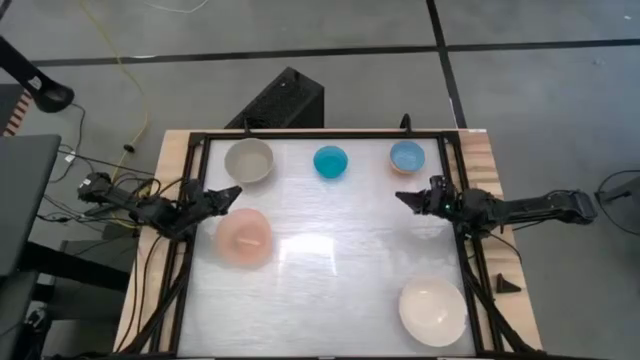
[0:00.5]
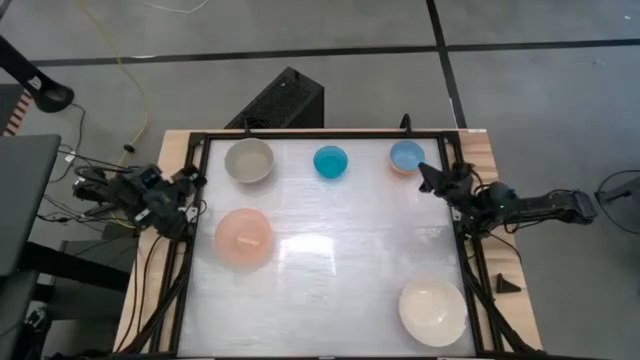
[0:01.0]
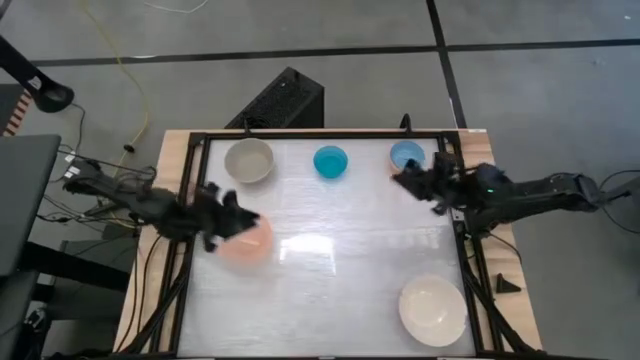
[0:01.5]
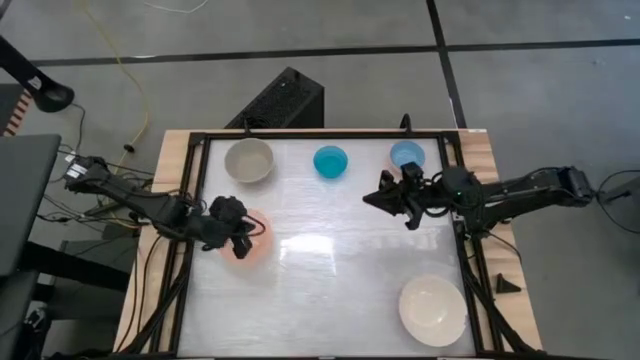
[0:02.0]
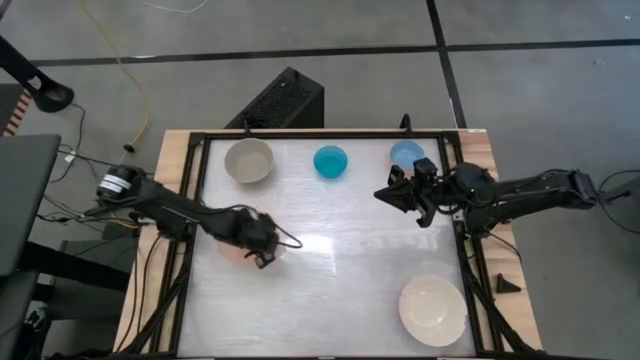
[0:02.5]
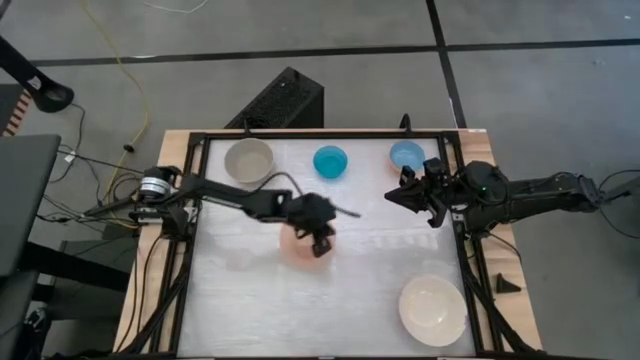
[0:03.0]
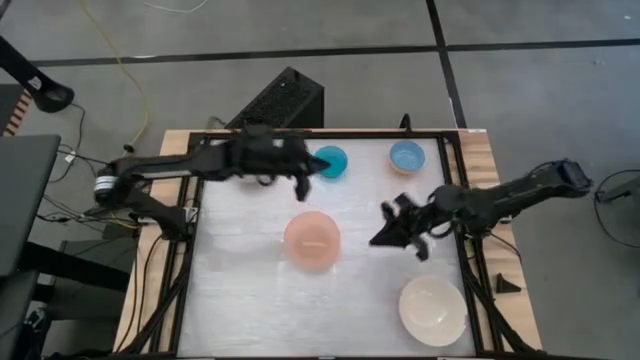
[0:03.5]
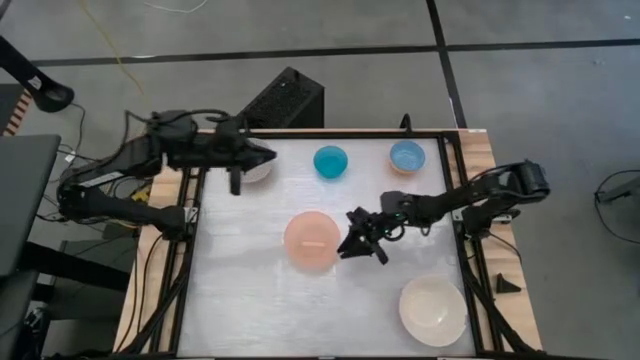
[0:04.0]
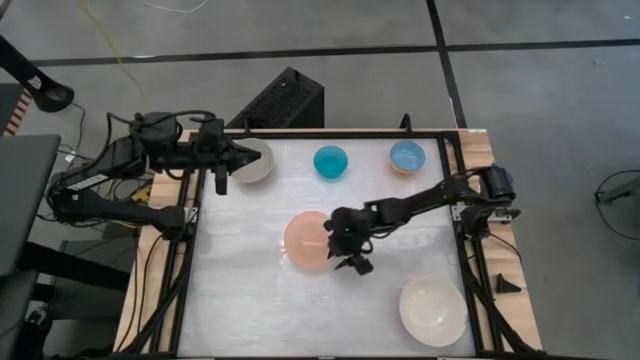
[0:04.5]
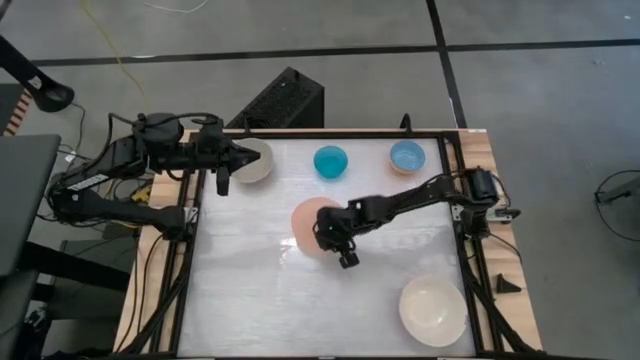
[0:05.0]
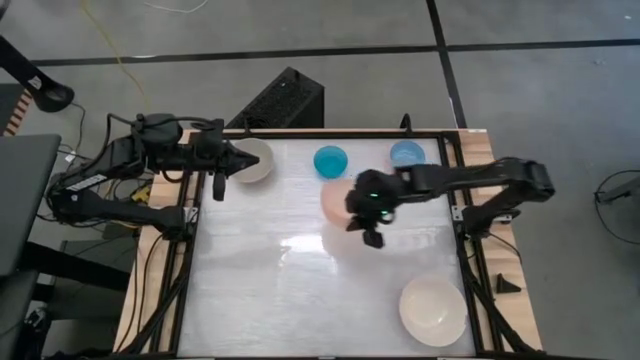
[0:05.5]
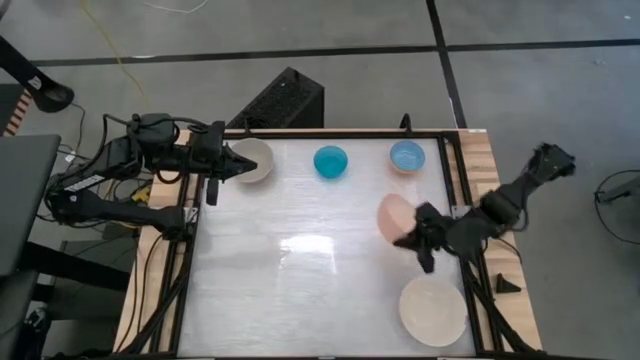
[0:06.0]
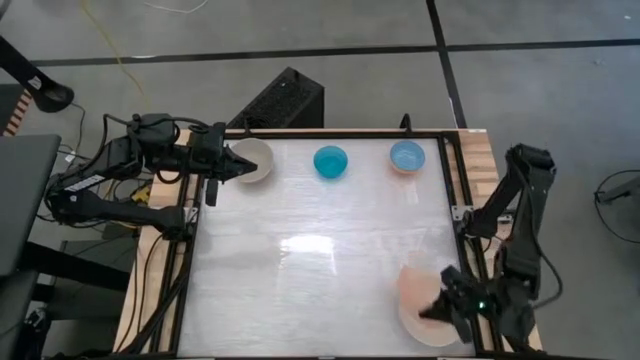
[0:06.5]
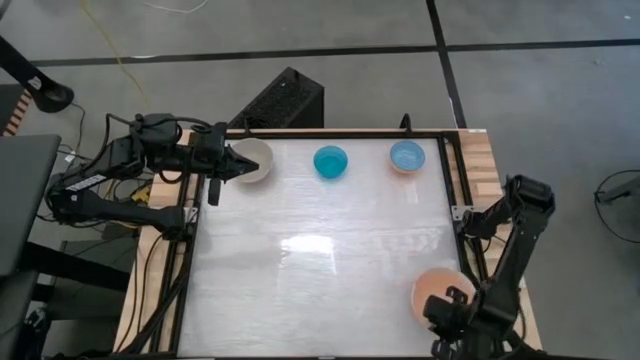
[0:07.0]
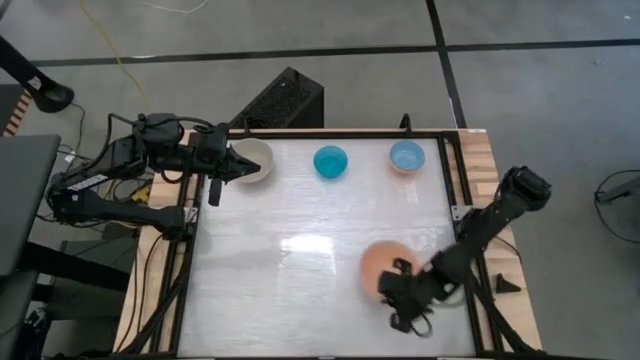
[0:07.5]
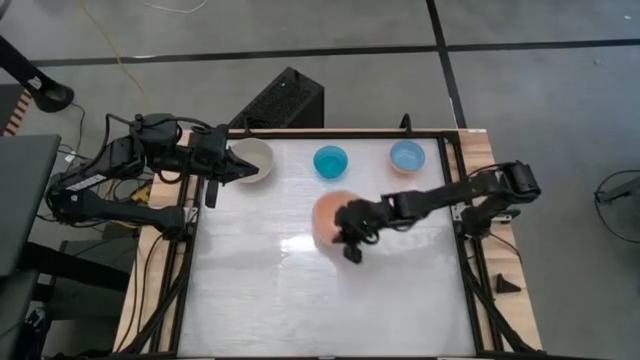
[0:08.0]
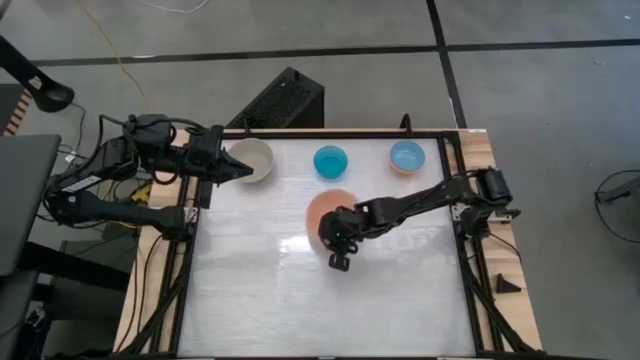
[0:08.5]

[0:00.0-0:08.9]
Stack the orange bowl on top of the white bowl

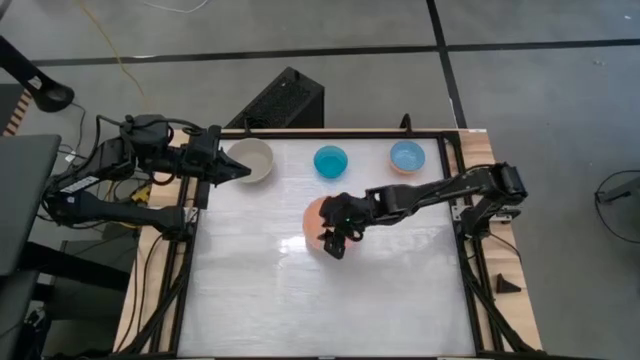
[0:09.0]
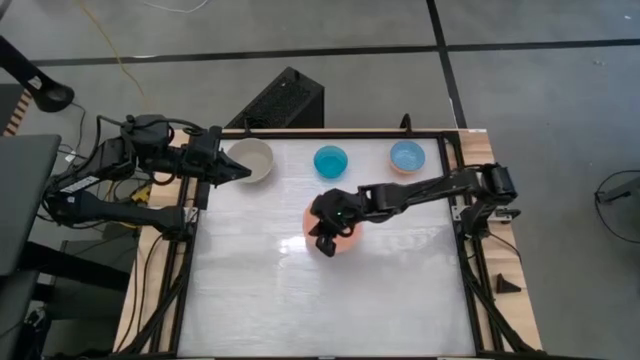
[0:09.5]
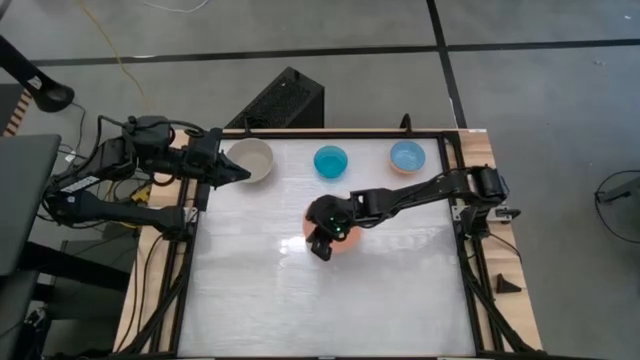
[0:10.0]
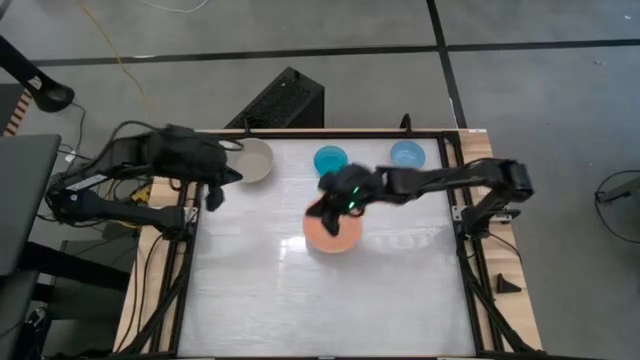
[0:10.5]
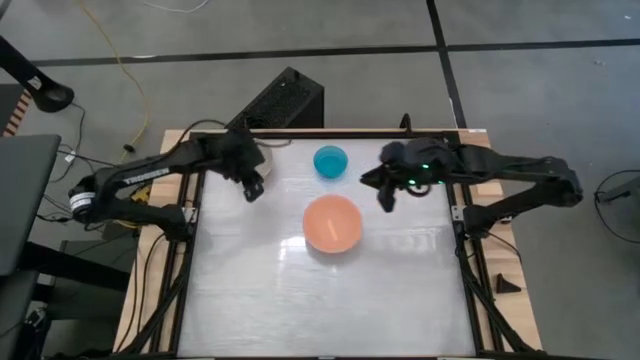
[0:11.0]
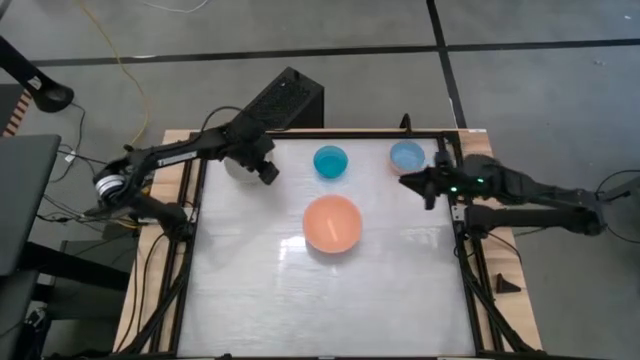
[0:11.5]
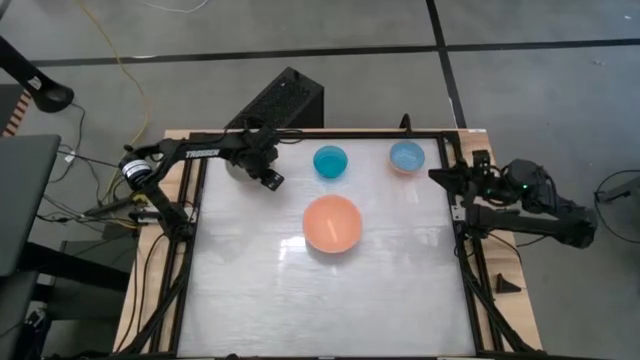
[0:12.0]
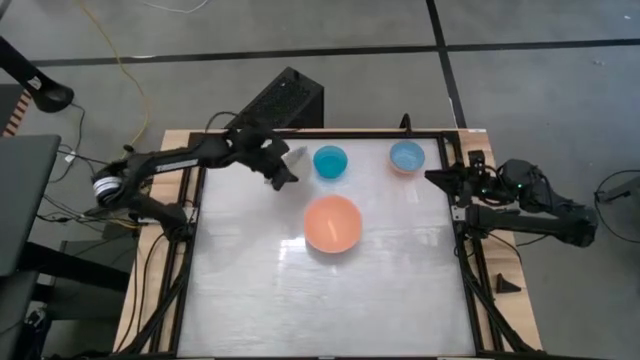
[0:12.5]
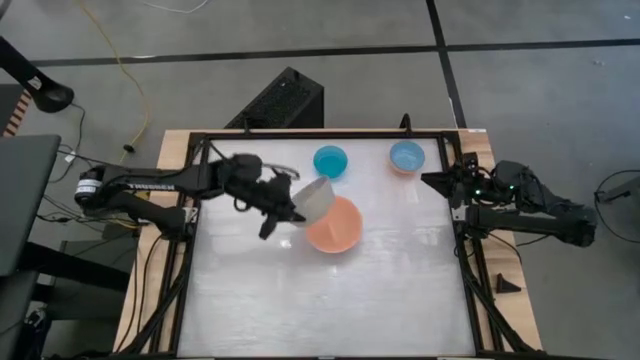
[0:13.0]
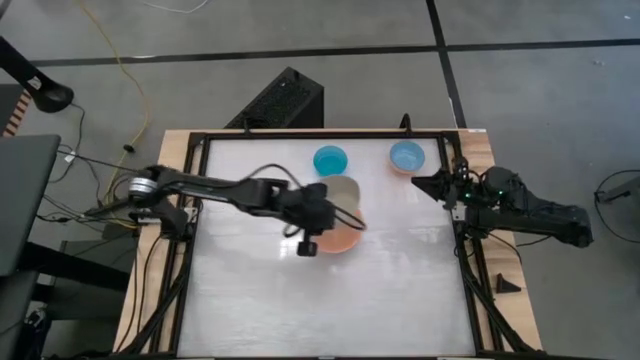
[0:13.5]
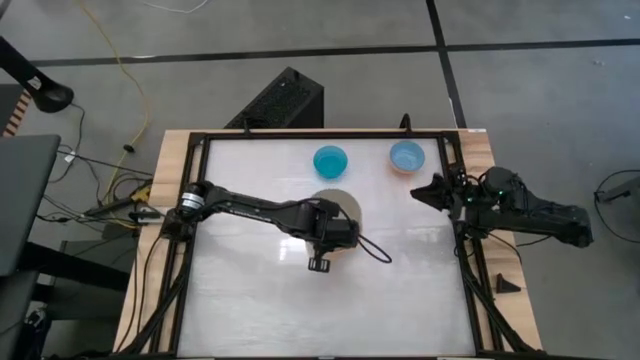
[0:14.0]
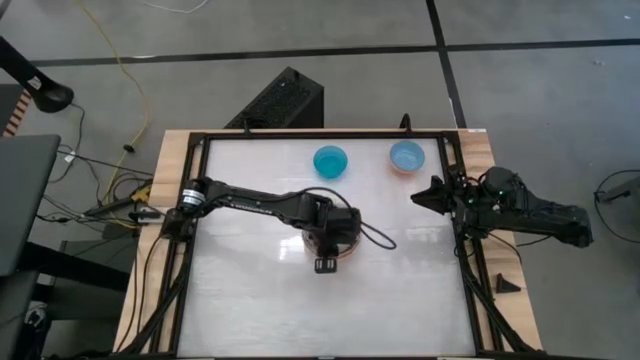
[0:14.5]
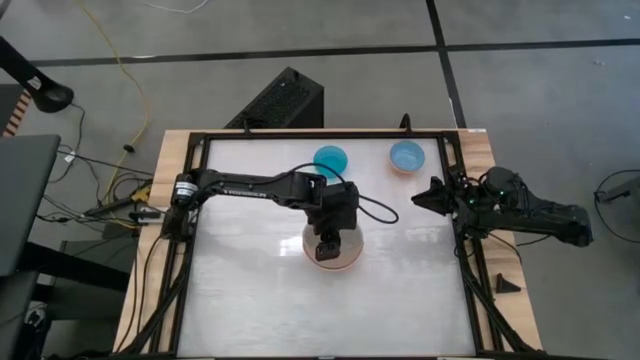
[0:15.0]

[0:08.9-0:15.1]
Stack the gray bowl on top of the orange bowl

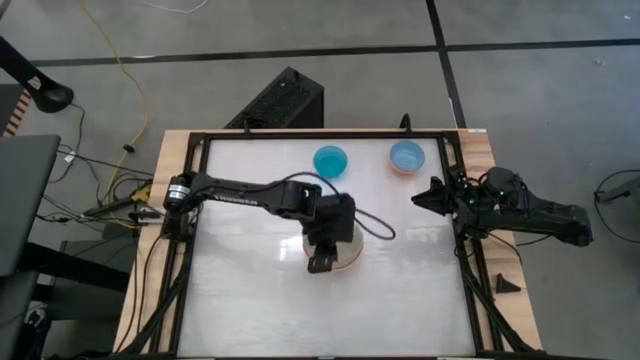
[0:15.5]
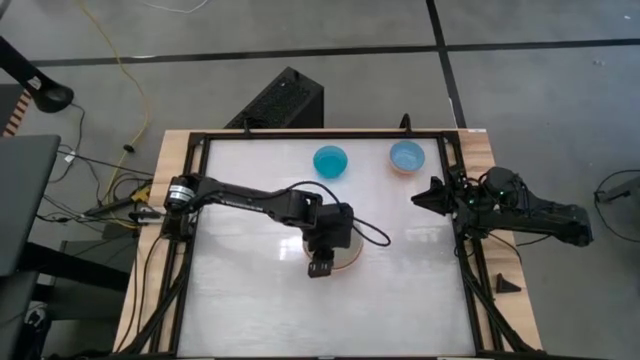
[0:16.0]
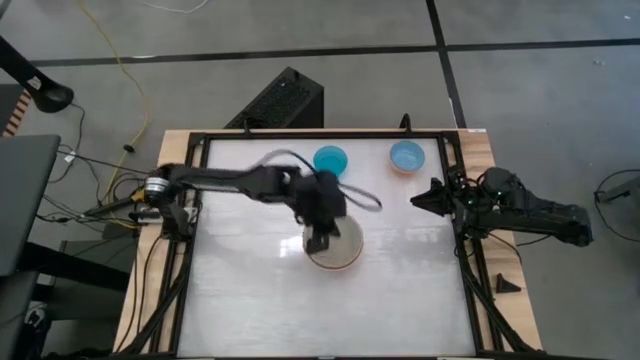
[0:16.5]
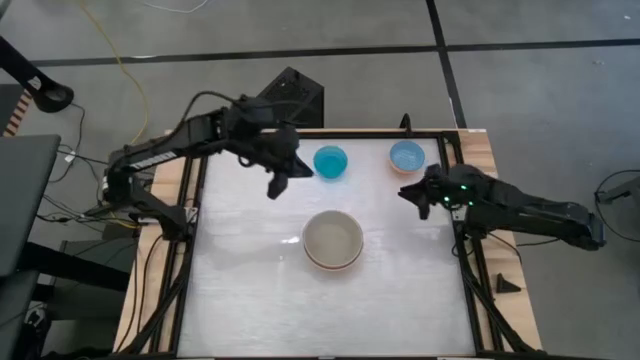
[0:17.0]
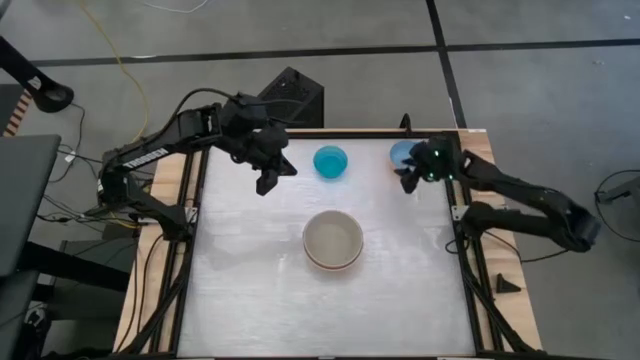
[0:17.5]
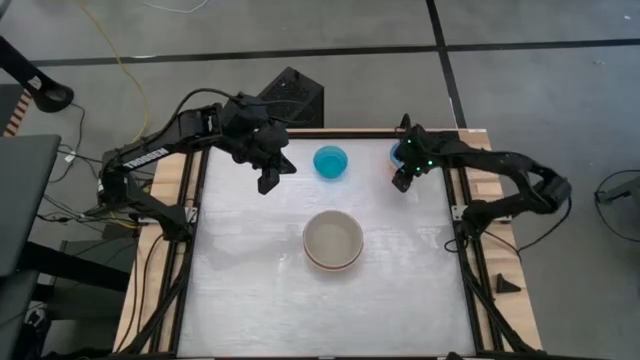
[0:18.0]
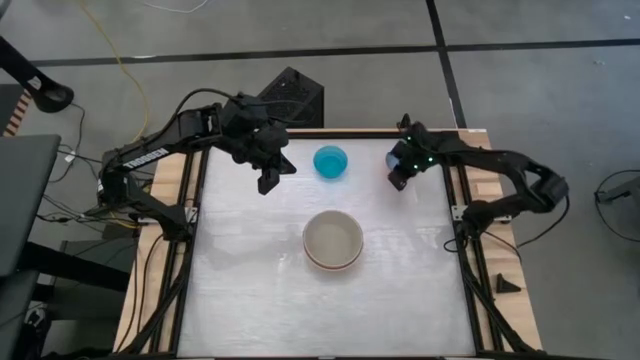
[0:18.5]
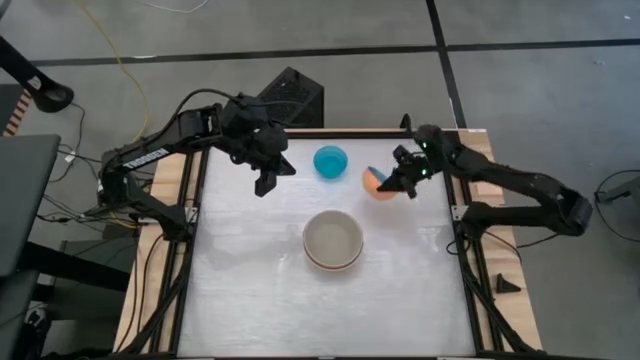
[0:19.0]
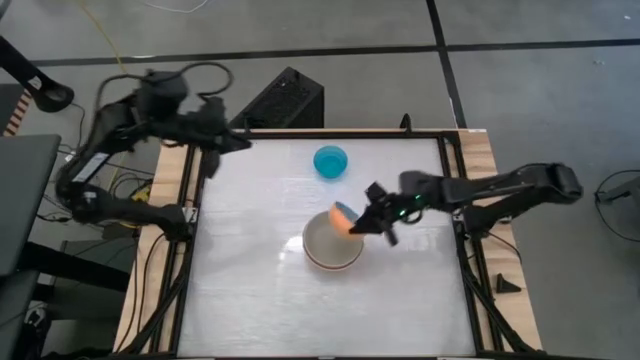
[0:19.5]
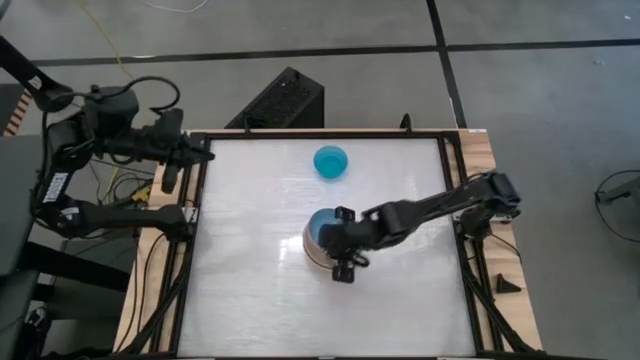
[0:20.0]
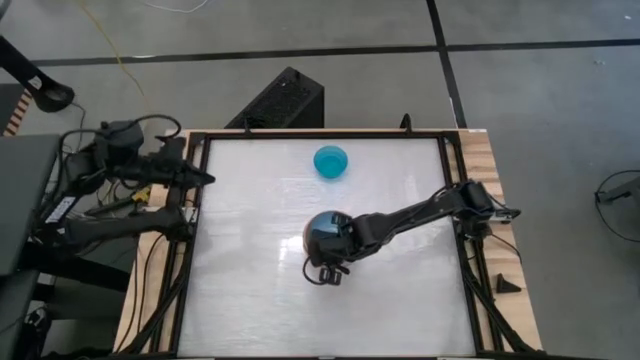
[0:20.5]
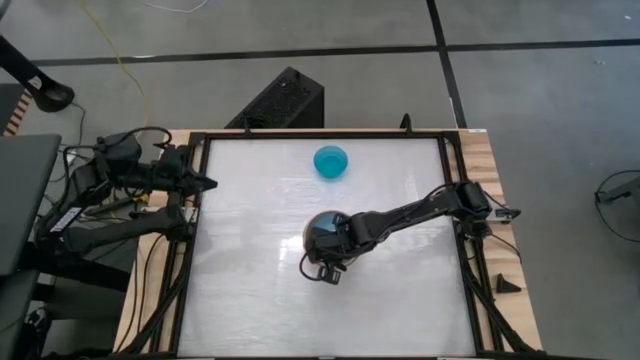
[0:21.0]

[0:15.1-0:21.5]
Stack the blue patterned bowl on top of the gray bowl
